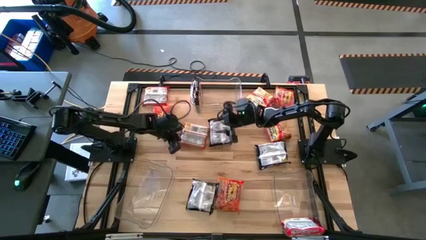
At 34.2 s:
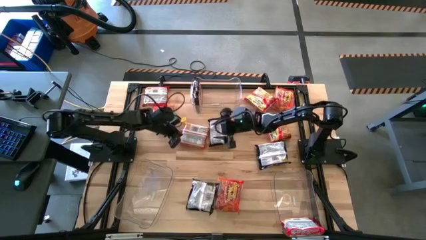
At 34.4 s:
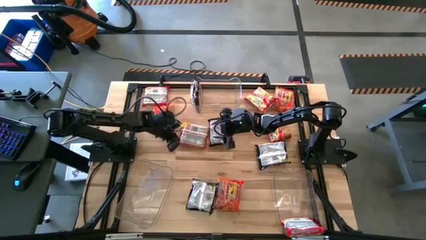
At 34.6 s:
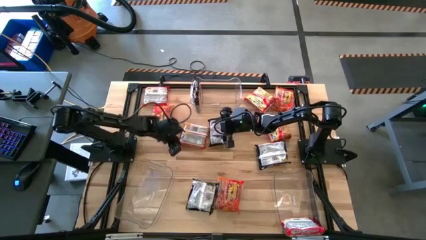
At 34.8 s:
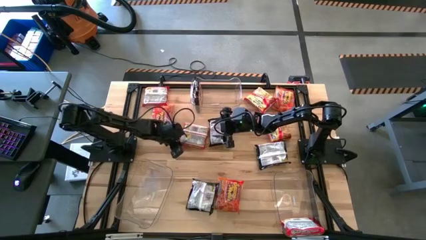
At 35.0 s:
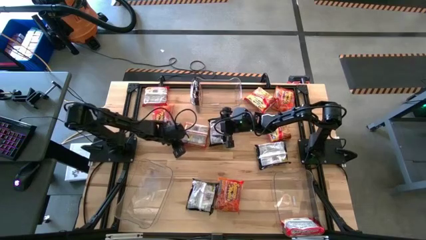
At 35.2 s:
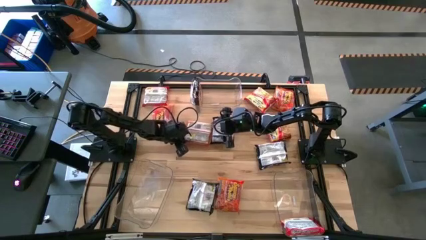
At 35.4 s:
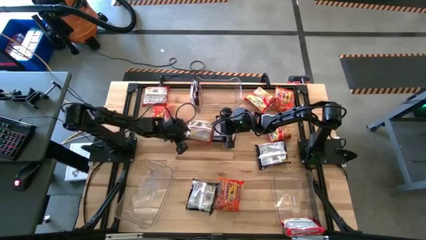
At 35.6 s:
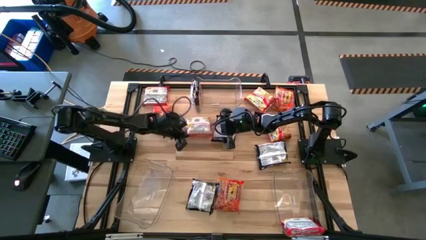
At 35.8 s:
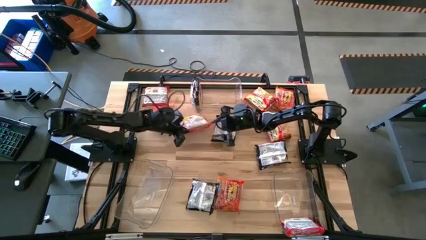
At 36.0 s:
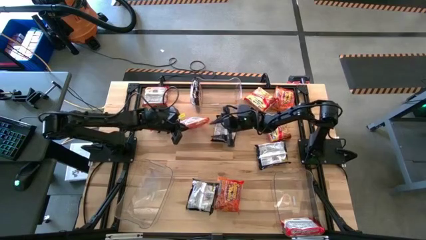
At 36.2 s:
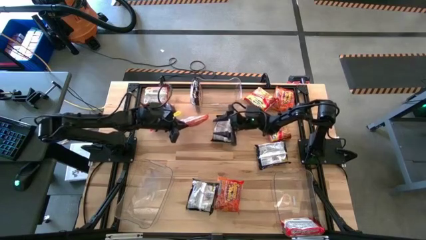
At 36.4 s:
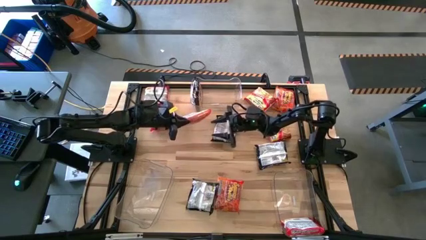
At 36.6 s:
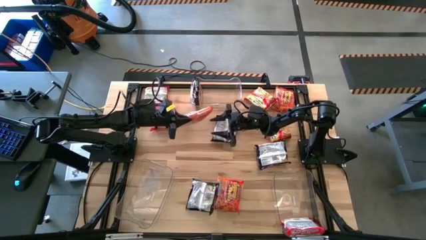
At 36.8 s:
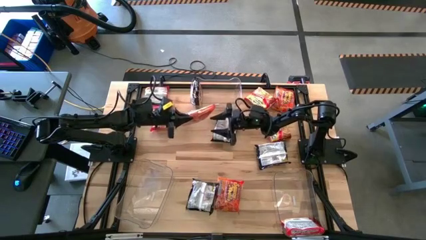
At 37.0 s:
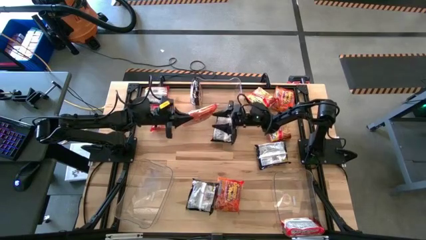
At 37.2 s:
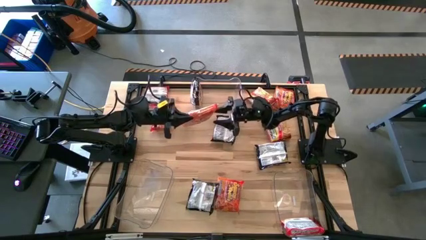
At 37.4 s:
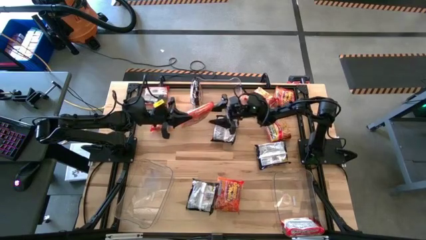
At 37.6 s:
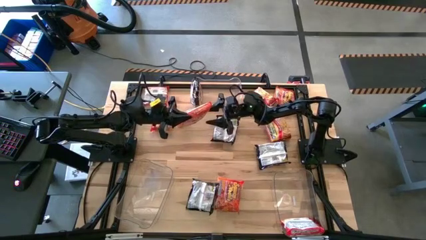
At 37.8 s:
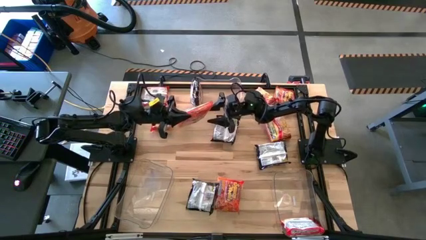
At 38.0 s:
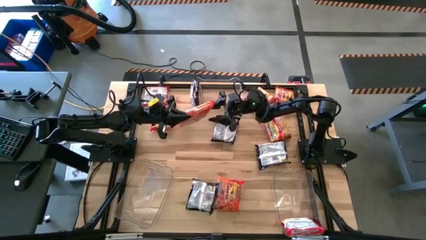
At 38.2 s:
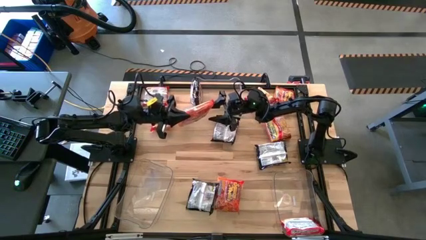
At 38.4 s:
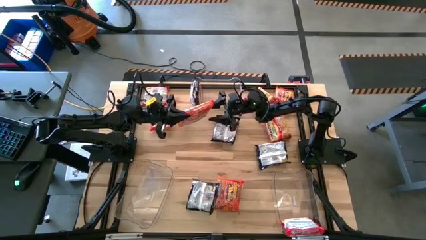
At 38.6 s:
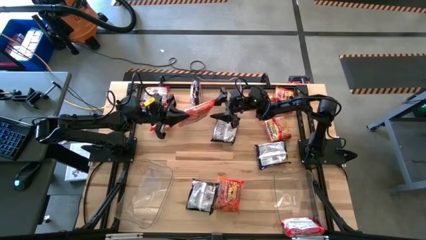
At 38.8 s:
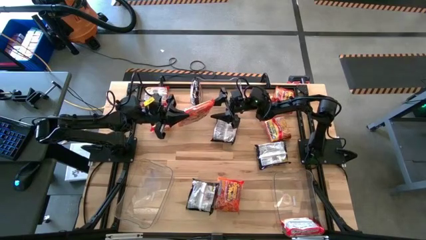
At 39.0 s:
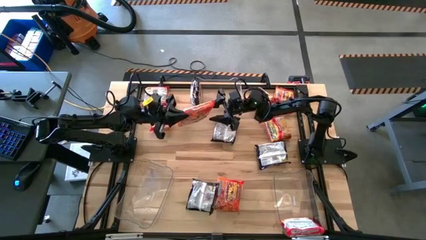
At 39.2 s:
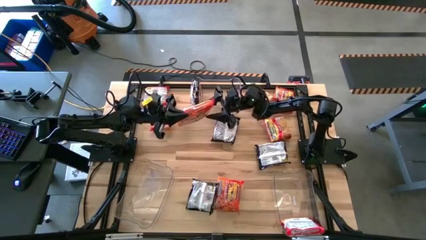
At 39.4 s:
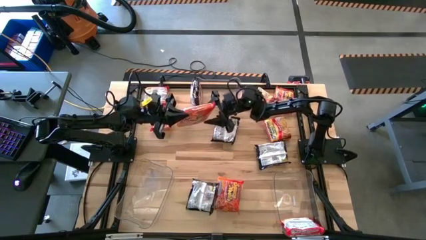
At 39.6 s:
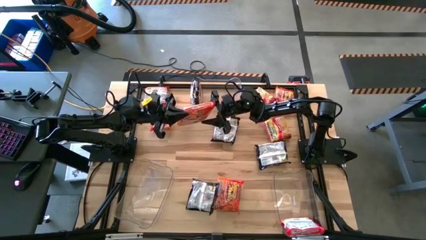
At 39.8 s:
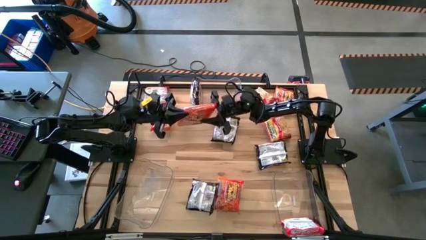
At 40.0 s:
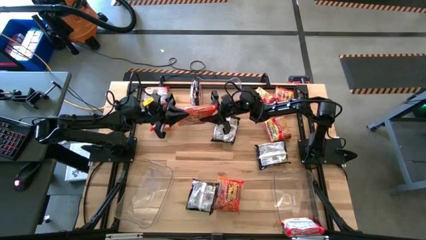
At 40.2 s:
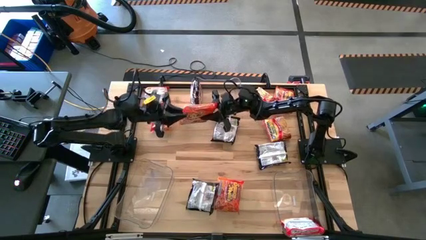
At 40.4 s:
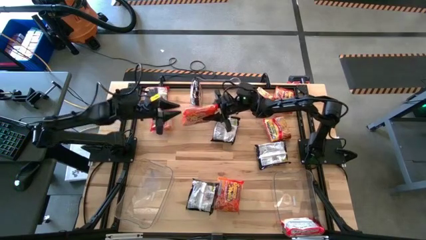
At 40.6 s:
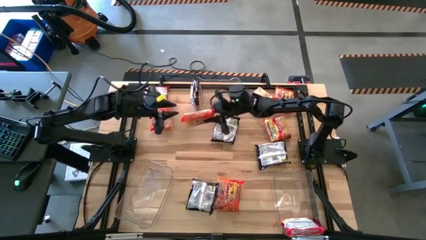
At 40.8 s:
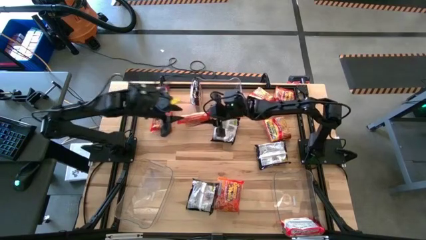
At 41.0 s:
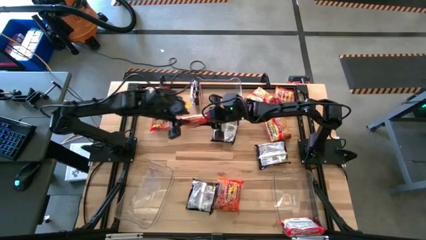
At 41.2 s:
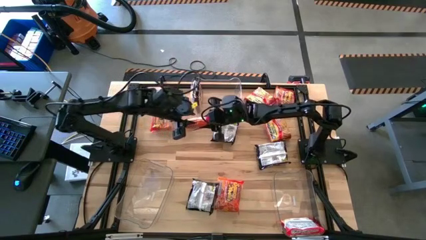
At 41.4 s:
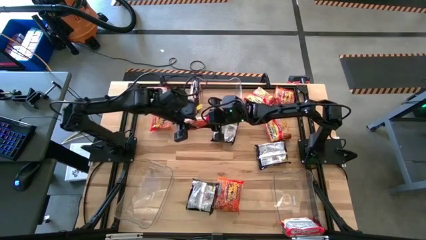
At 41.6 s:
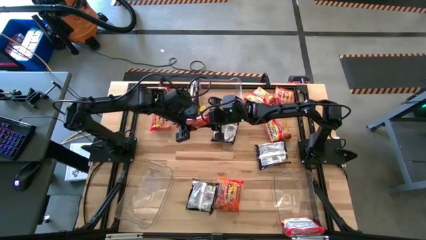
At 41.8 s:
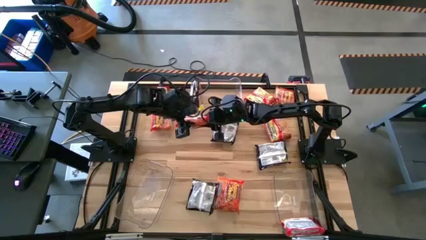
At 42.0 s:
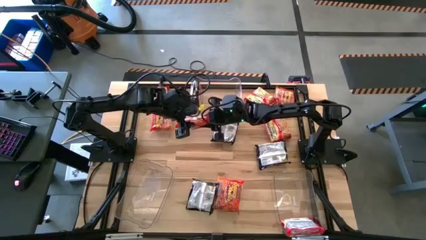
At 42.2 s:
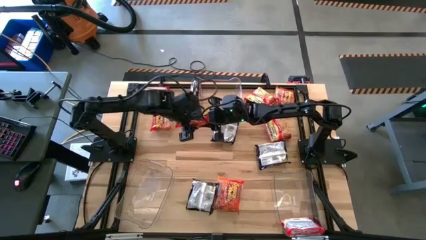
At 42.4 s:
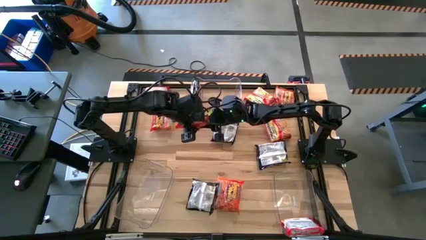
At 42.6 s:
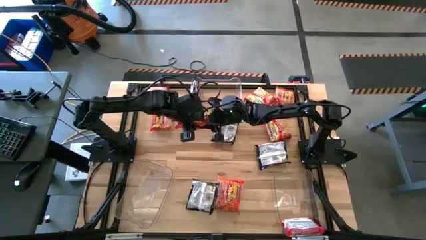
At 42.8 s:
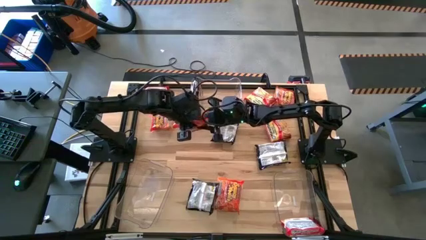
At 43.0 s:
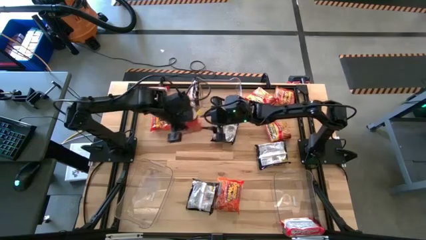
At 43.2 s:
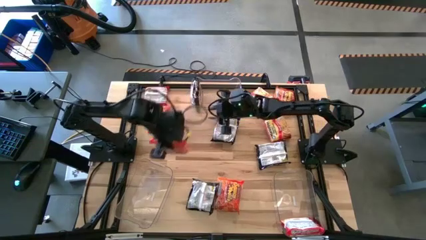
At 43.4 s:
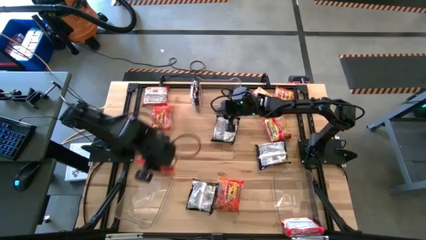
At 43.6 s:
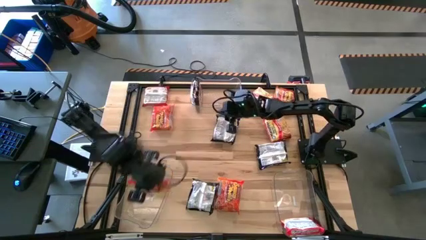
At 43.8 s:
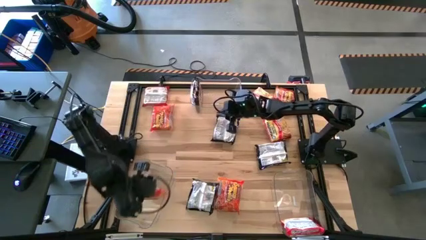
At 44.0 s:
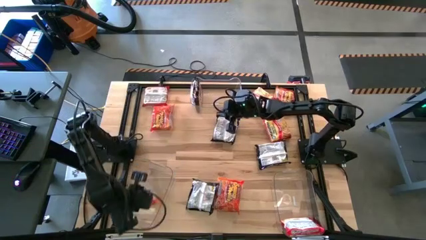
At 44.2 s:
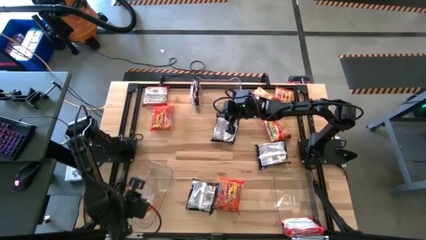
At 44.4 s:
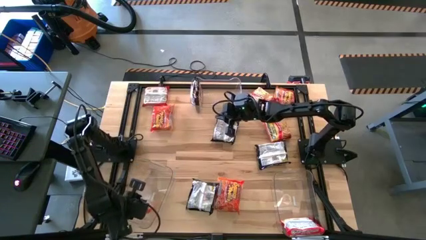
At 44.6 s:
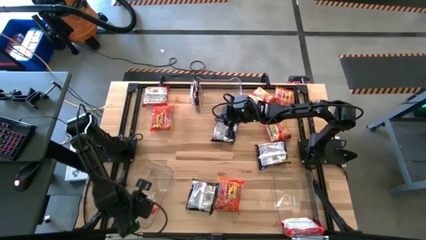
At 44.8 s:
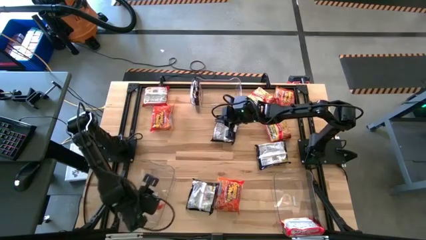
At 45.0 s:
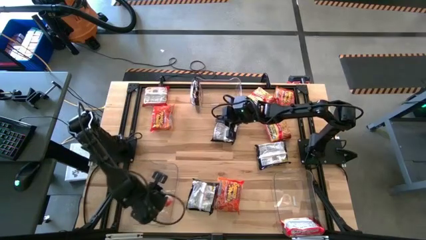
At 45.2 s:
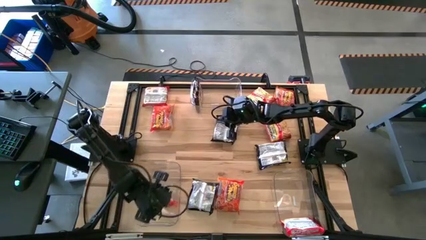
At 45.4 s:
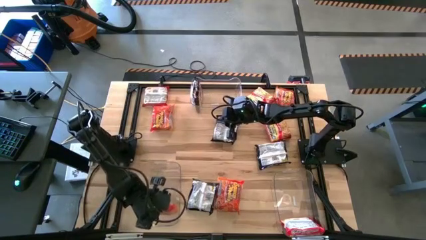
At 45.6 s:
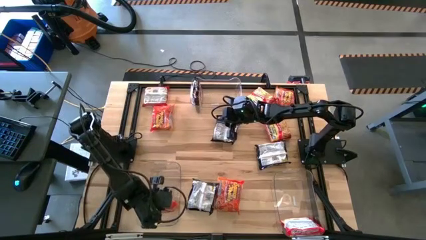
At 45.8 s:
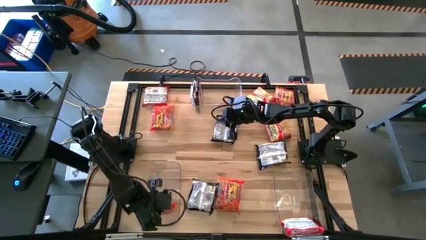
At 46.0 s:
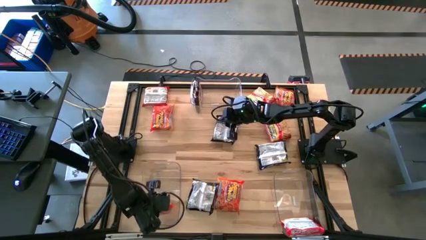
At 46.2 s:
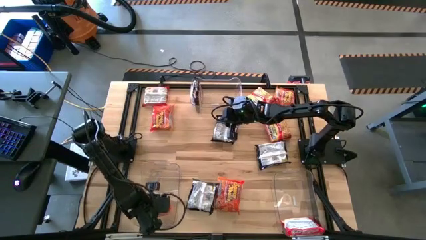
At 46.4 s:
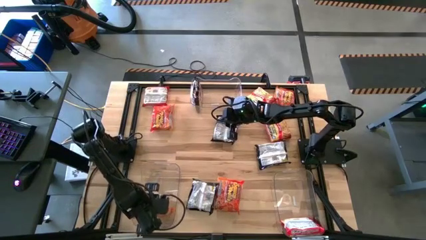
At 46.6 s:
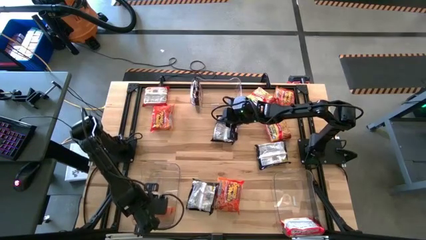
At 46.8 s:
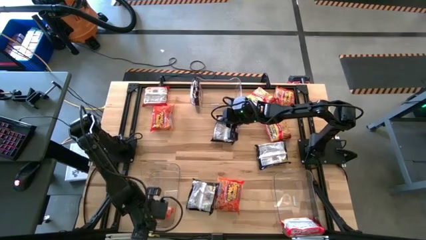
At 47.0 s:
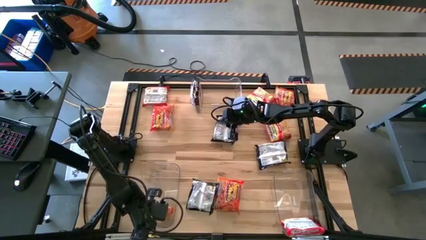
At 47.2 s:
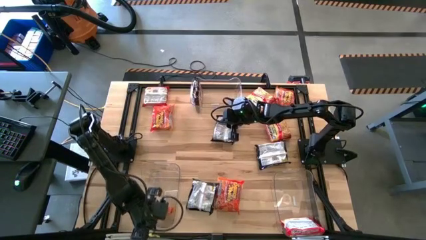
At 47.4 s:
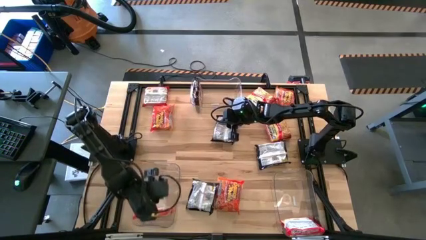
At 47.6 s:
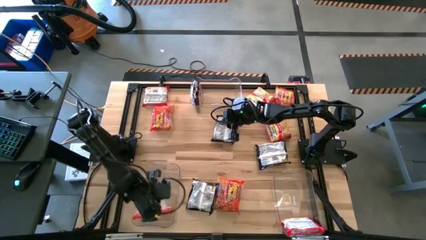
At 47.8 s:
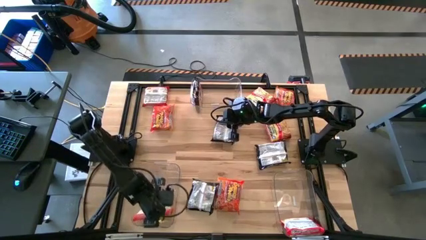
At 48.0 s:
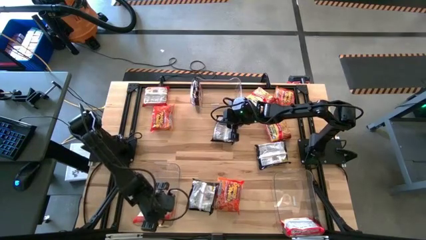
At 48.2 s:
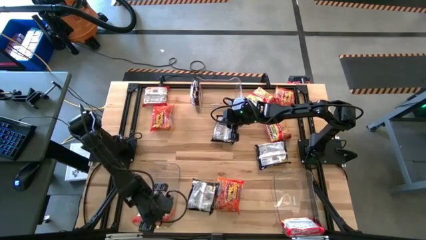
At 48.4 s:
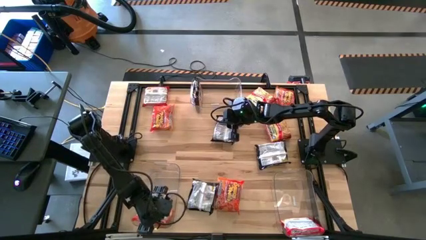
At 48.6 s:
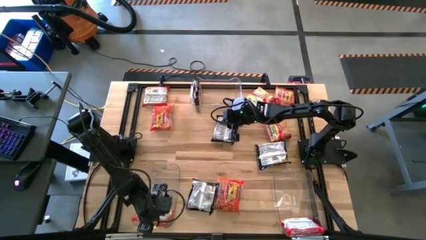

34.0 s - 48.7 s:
Task: Sort Maruchan noodles
Put the middle left orange noodle pack into the bottom left transparent bin

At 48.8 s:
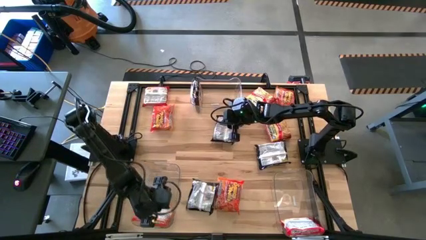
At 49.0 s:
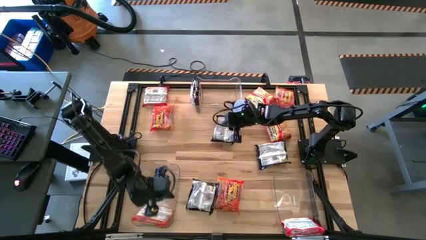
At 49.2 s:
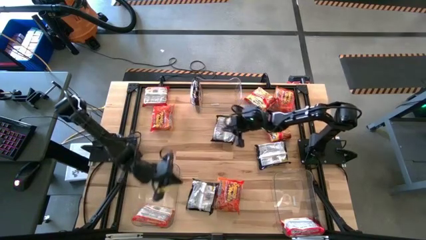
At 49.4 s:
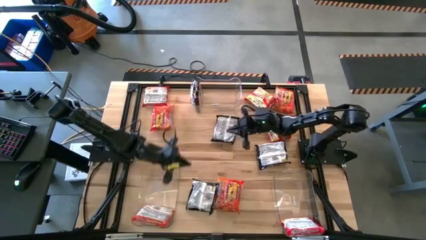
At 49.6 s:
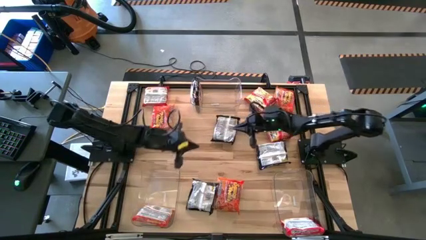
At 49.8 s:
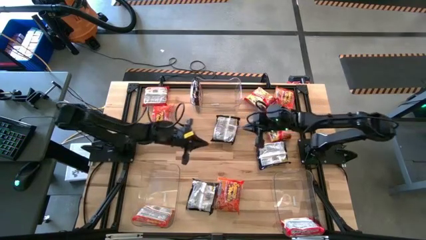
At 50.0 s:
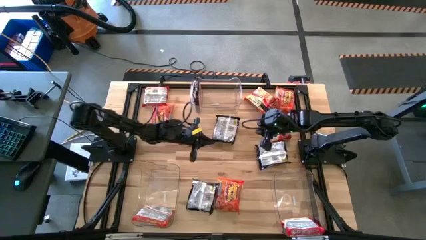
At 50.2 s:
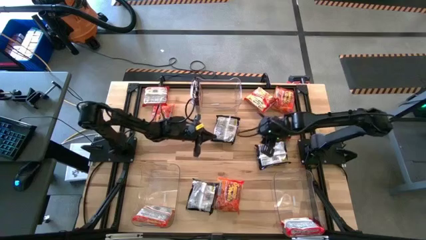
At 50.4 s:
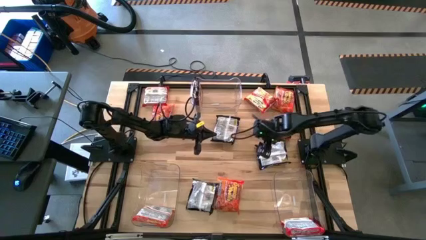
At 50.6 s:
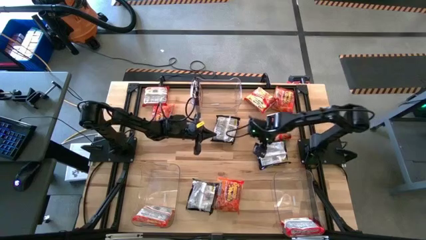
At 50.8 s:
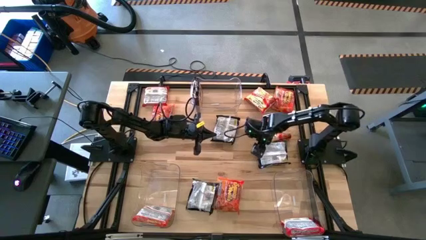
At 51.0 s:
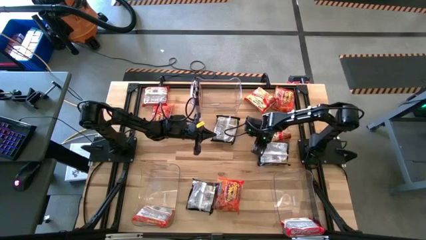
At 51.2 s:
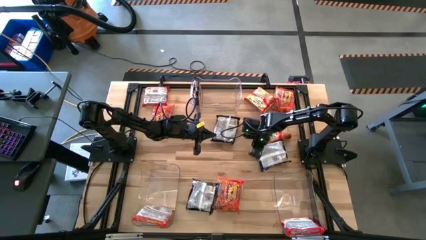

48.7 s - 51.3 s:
Put the right black noodle pack into the top transparent bin
